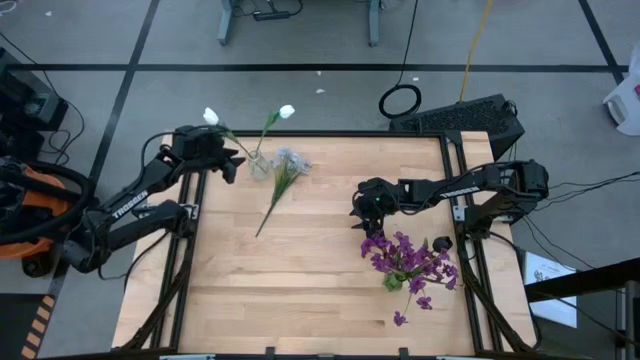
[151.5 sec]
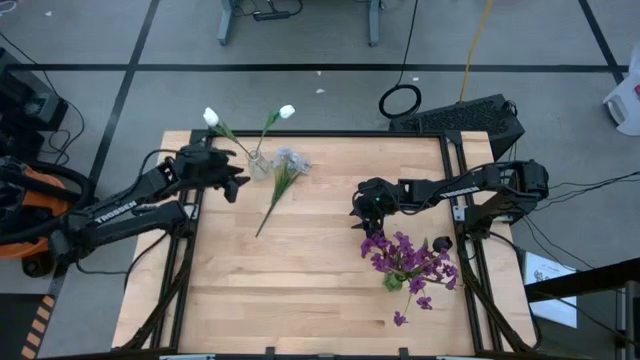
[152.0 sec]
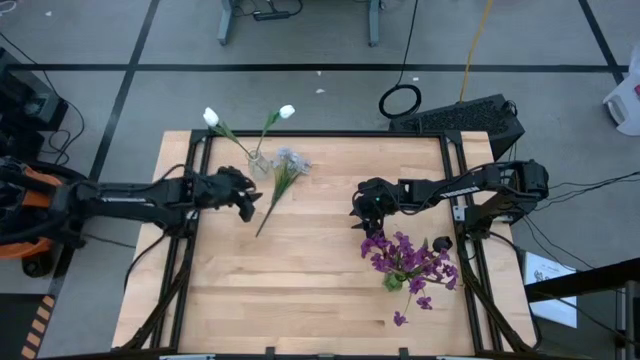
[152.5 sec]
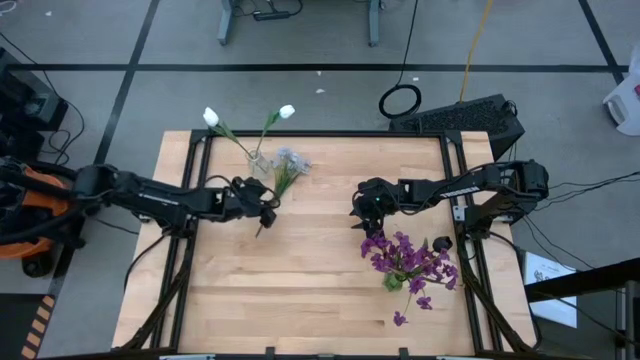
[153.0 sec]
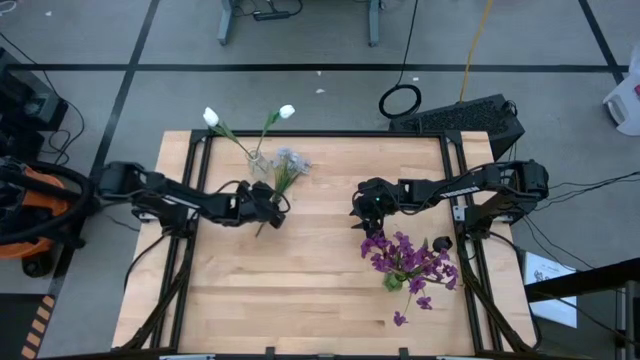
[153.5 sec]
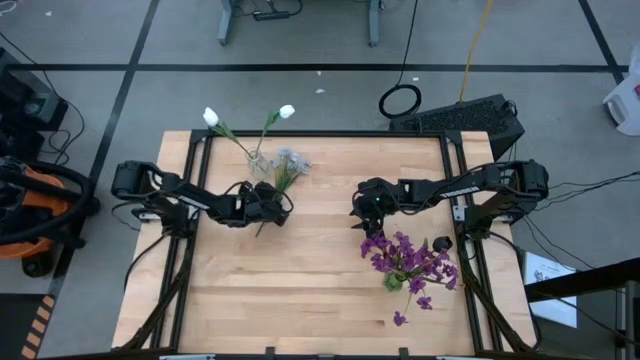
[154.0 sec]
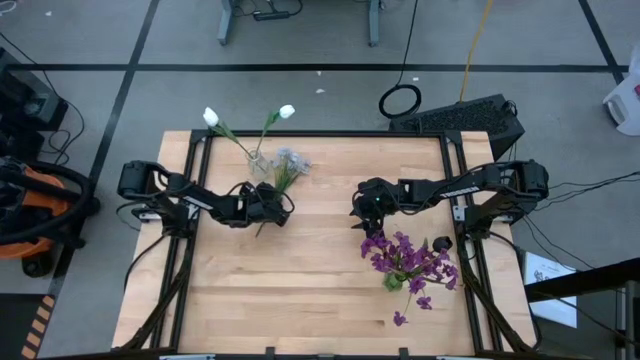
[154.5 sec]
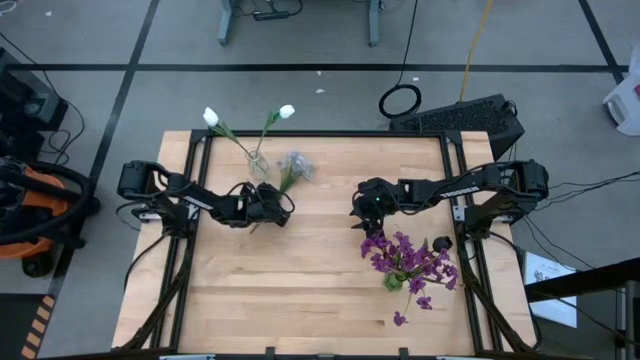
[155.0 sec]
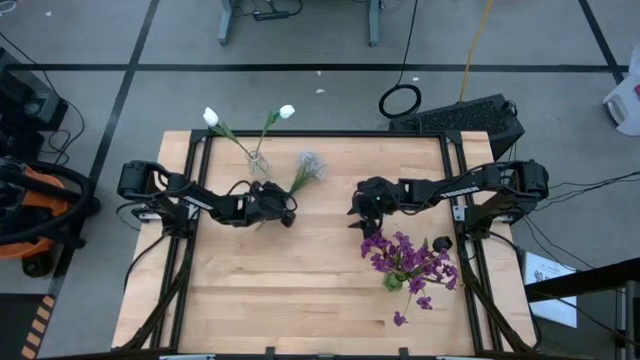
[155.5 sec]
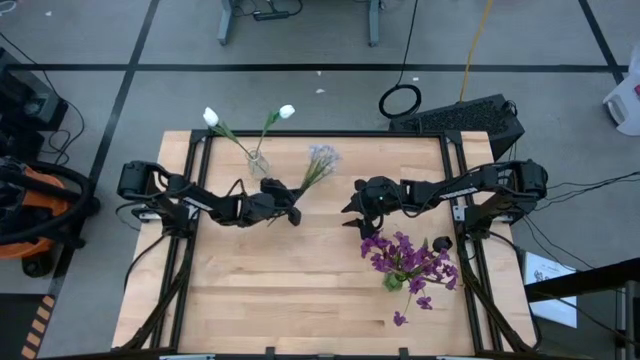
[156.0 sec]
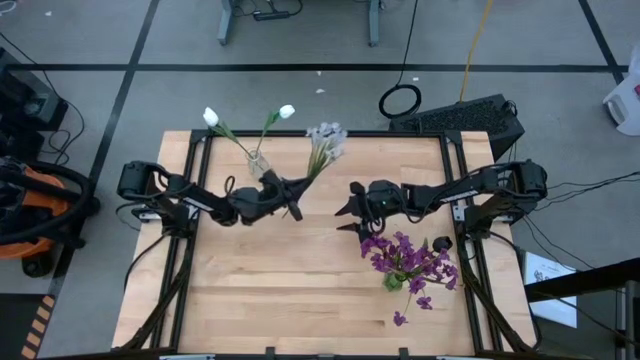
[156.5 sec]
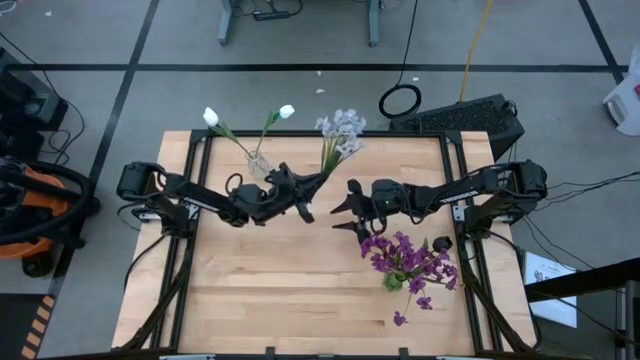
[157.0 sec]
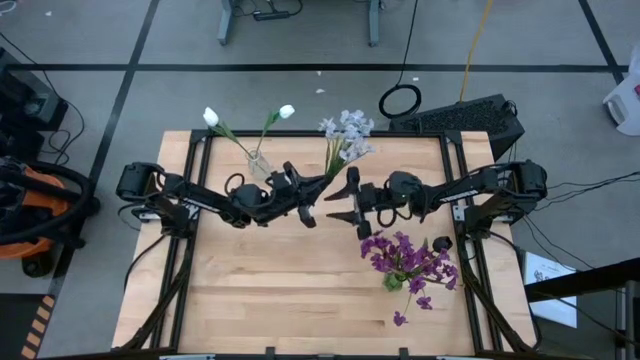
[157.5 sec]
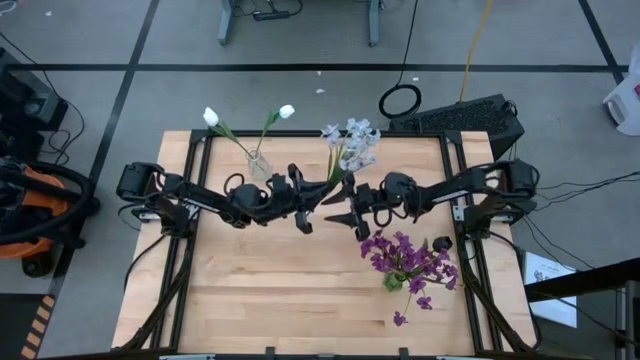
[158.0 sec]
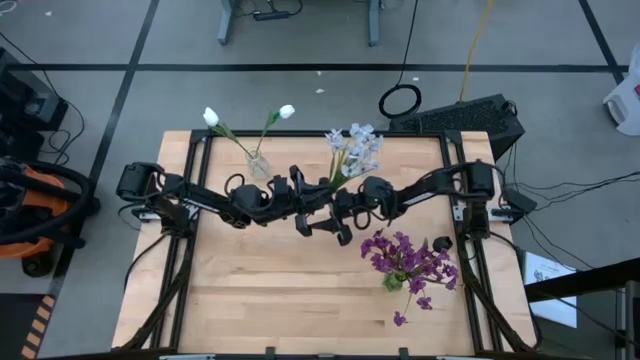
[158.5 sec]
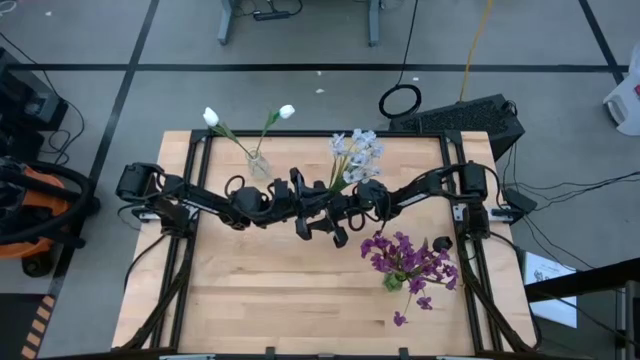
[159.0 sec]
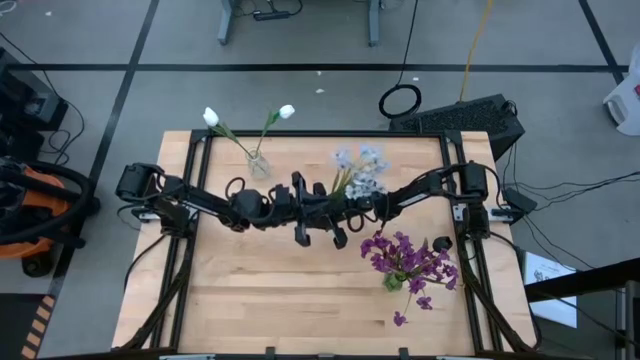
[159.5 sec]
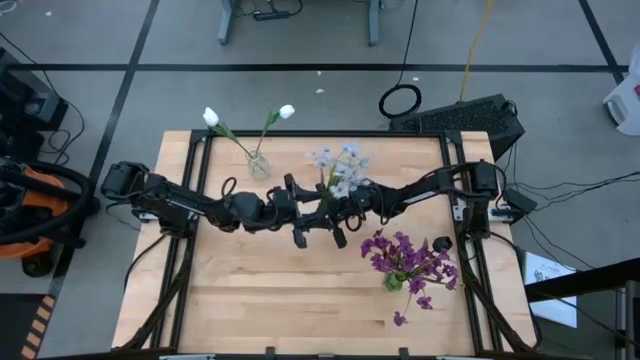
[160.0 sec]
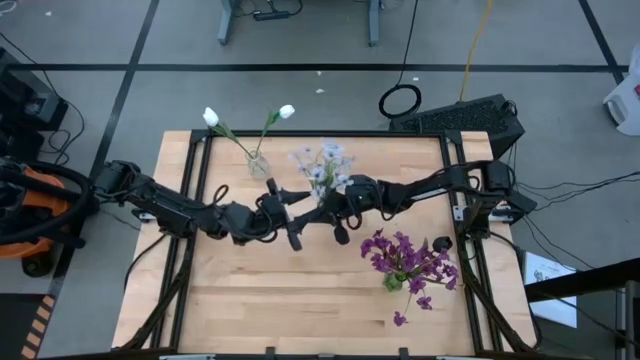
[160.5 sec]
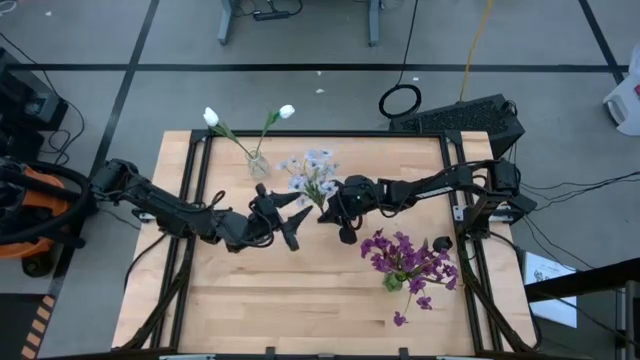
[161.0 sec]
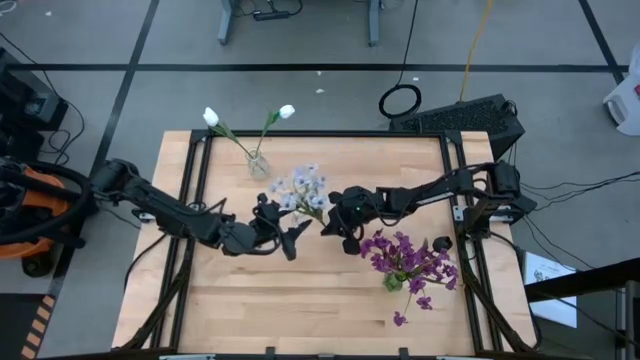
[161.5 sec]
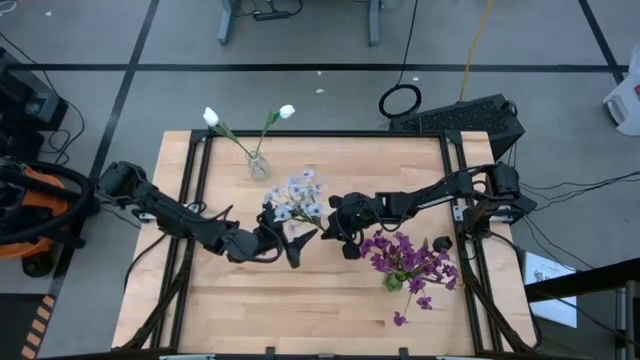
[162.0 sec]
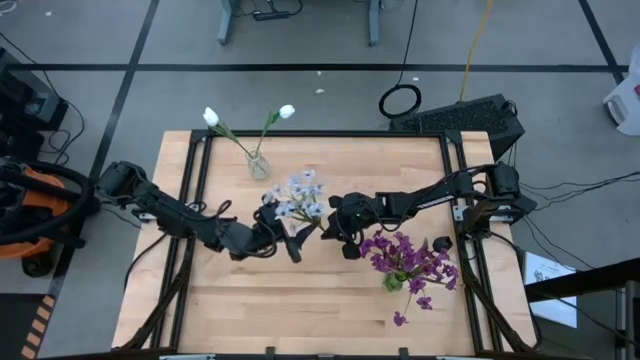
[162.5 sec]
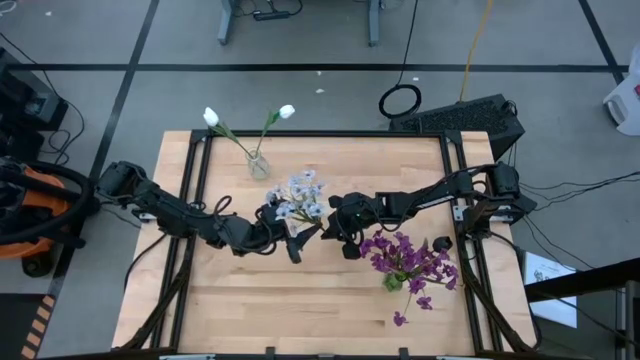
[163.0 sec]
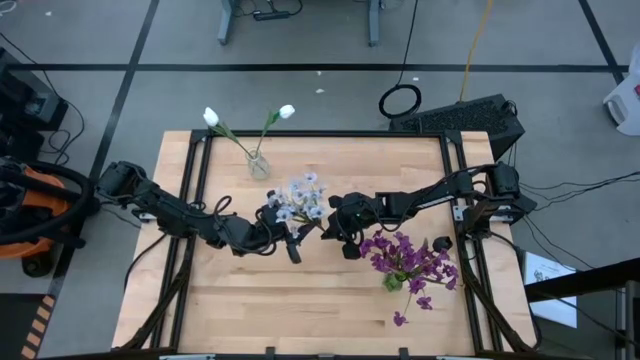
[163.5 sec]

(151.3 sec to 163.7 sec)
Task: Sort flowers into vase by color
Put the white flower into the transparent vase

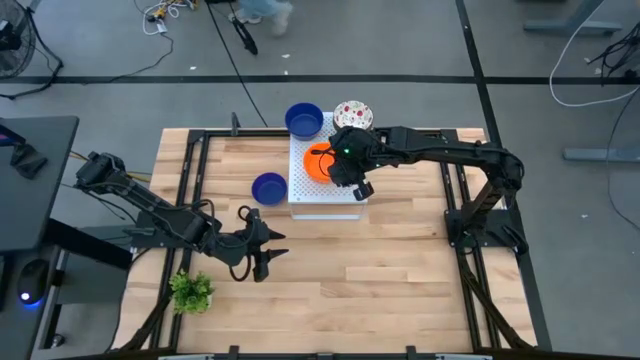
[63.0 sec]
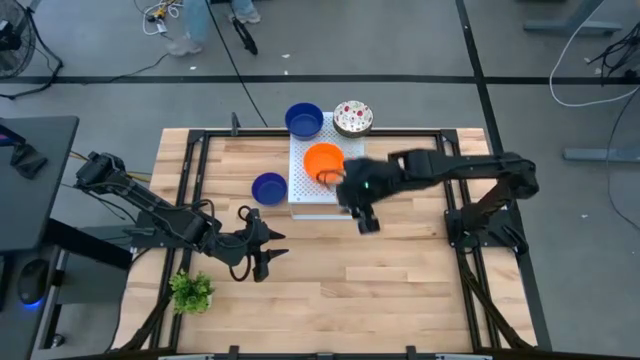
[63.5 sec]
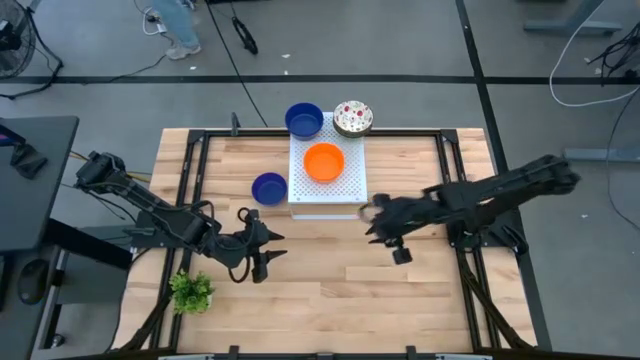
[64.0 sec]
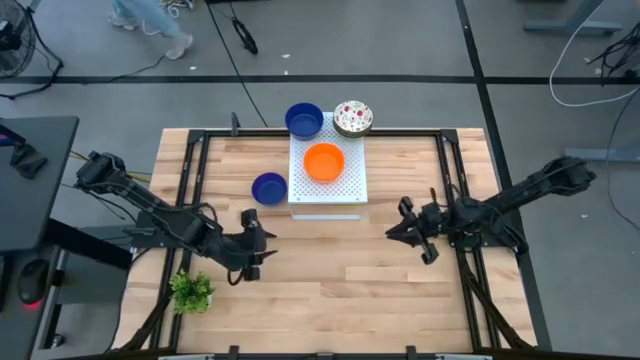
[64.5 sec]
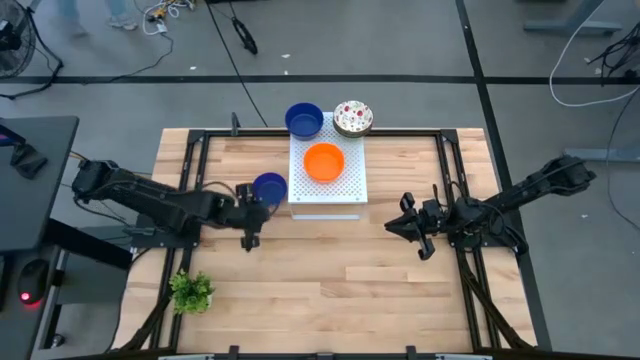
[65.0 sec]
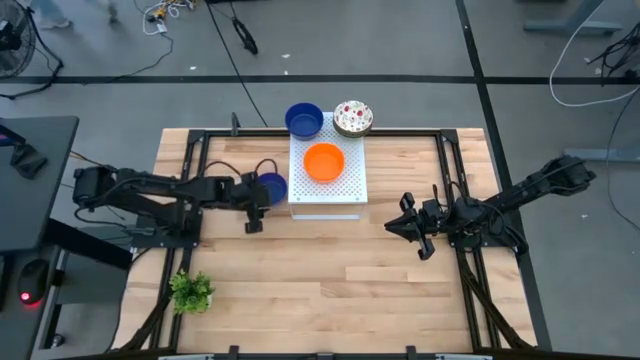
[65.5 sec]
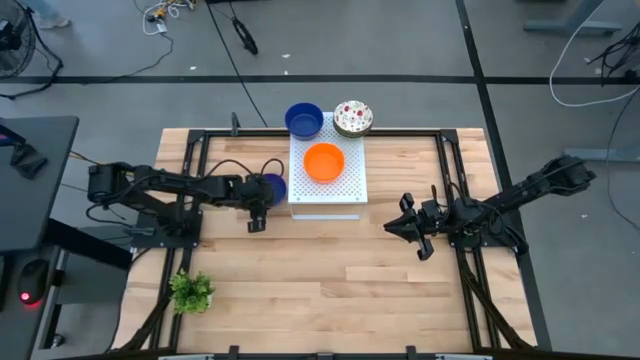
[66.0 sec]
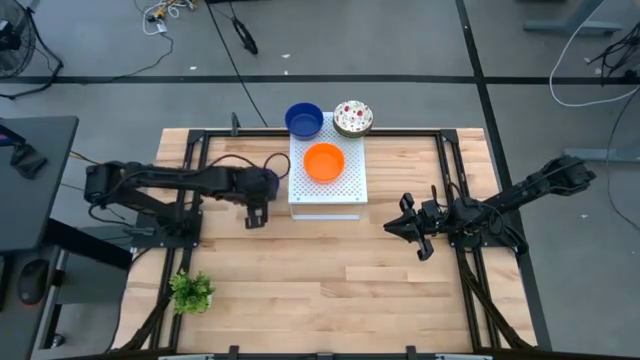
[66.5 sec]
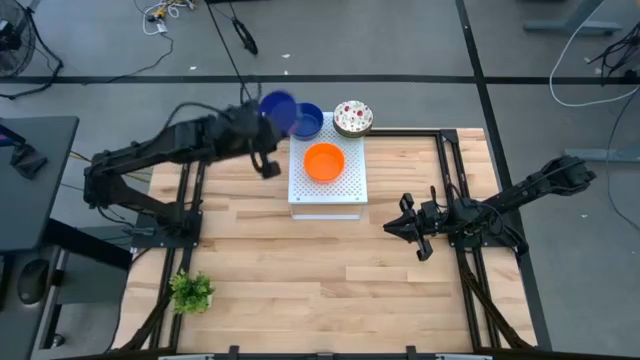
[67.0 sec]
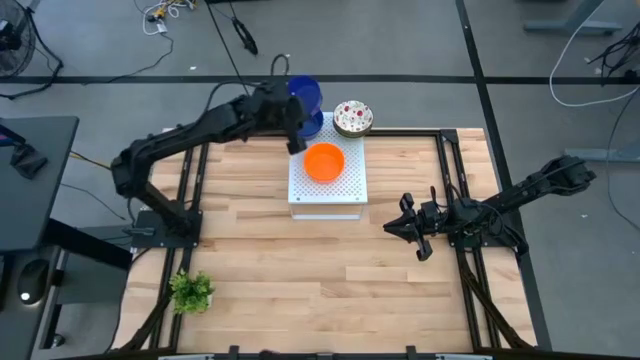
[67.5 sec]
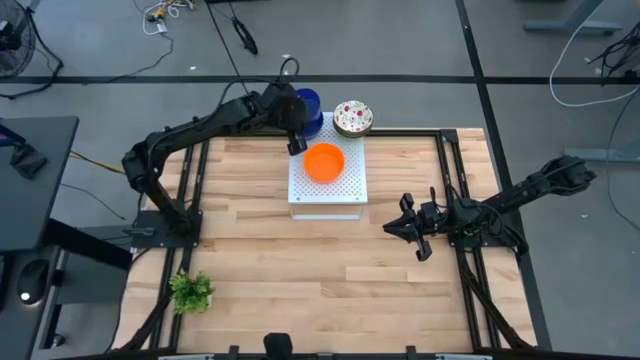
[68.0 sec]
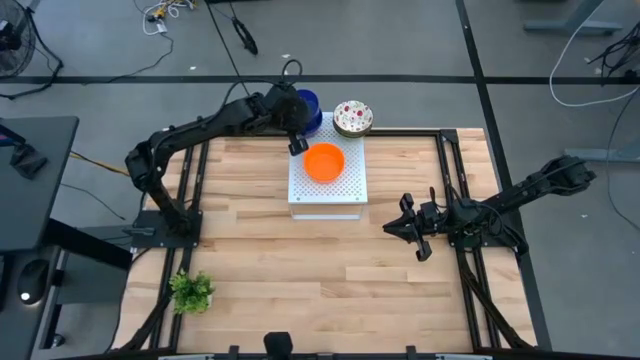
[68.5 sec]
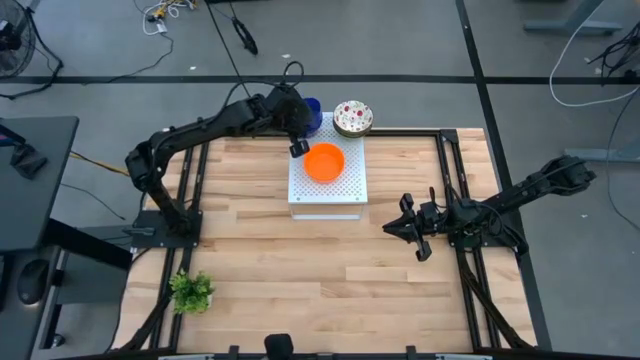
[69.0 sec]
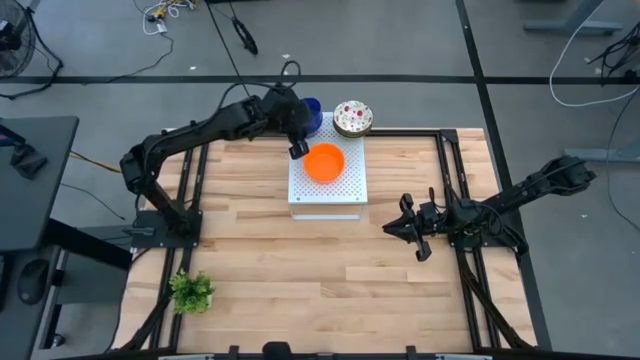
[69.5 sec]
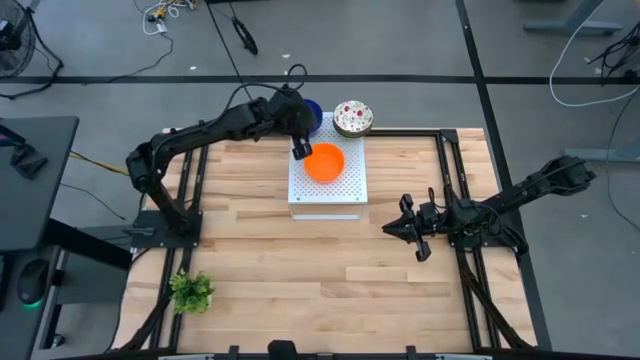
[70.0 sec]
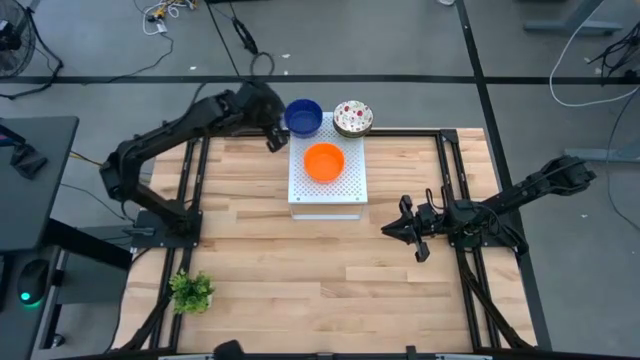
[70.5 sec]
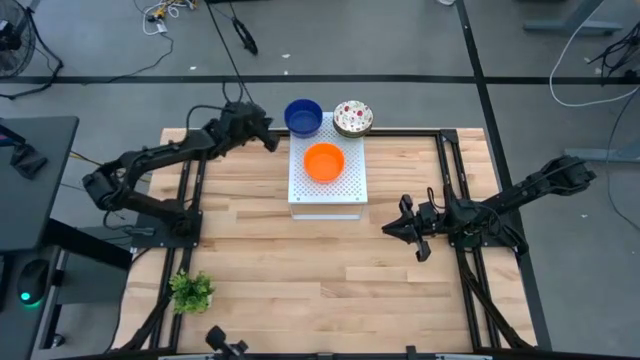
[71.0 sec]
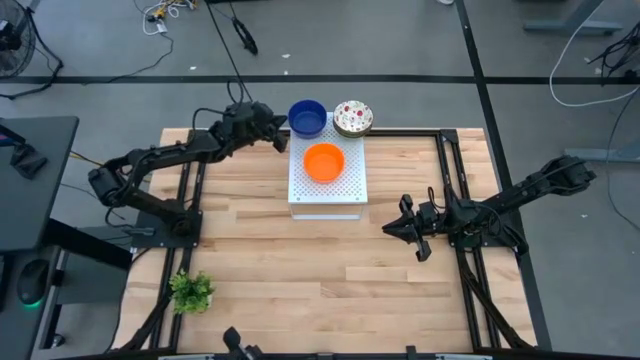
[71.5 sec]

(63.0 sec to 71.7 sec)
Task: Pick & Place Mini bowls
Stack the blue bowl on the other blue bowl on the shelf
